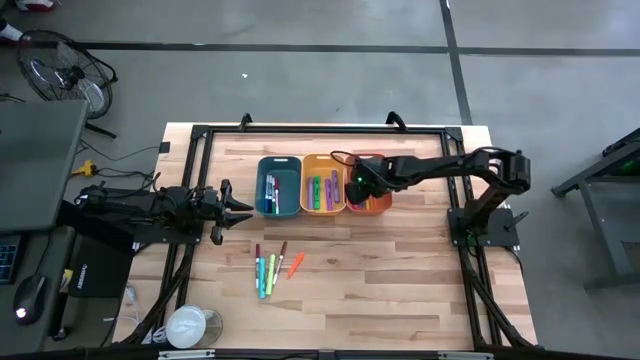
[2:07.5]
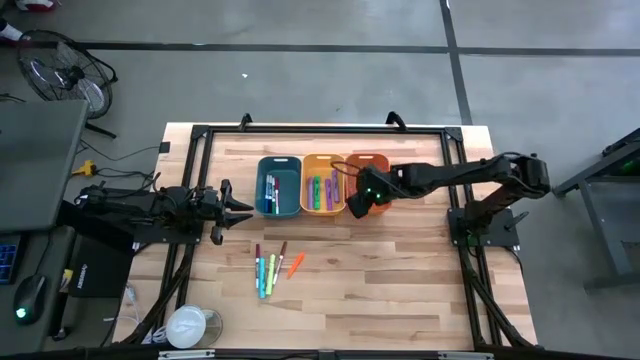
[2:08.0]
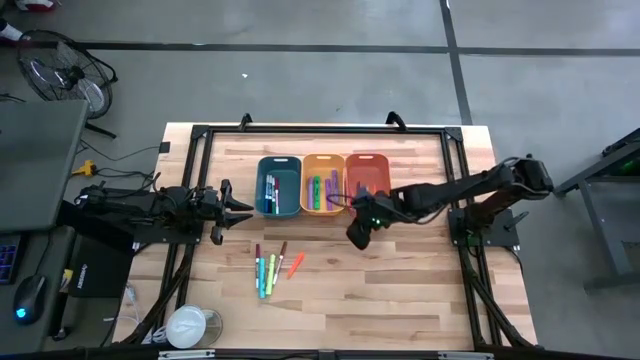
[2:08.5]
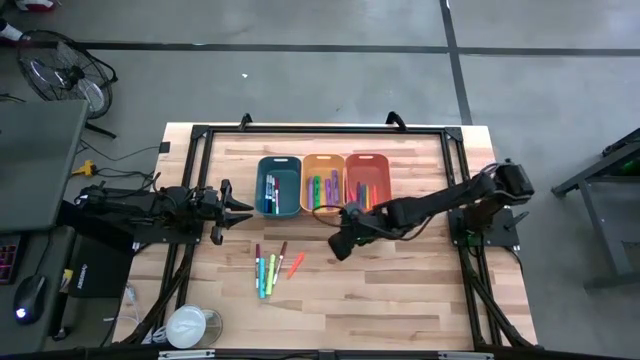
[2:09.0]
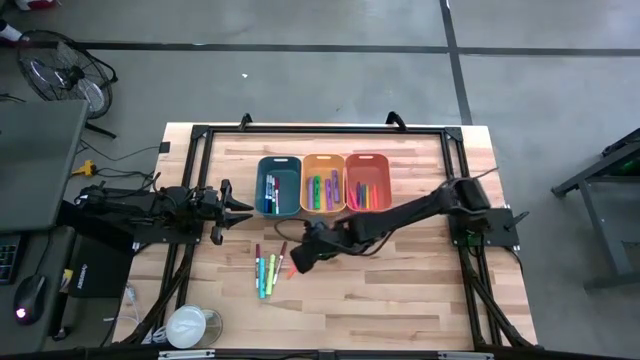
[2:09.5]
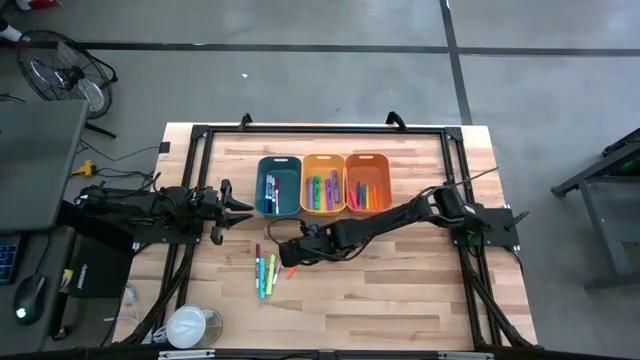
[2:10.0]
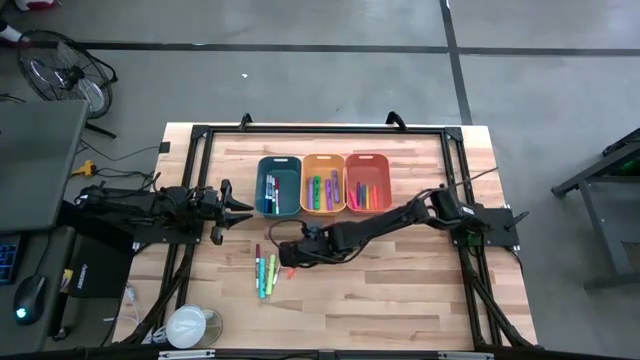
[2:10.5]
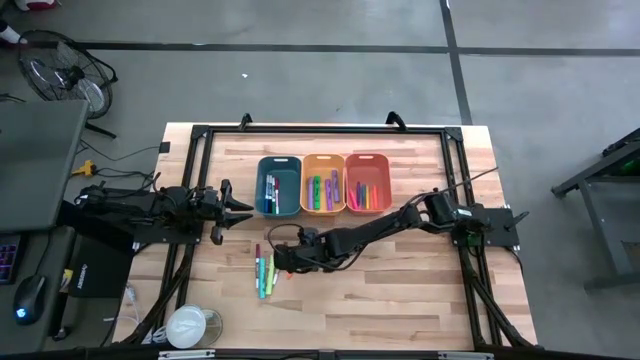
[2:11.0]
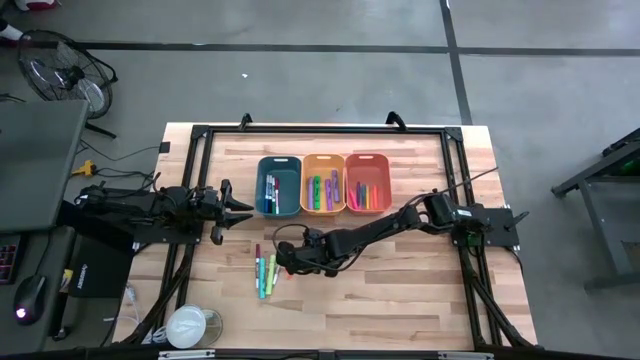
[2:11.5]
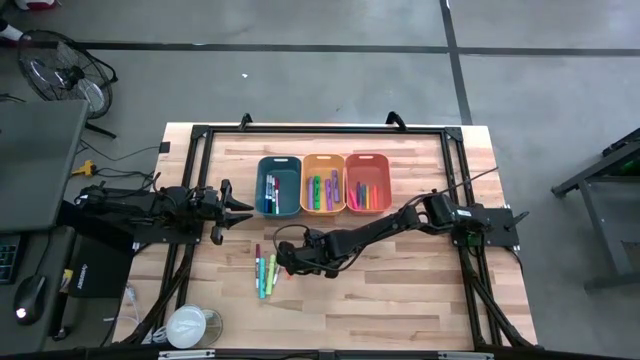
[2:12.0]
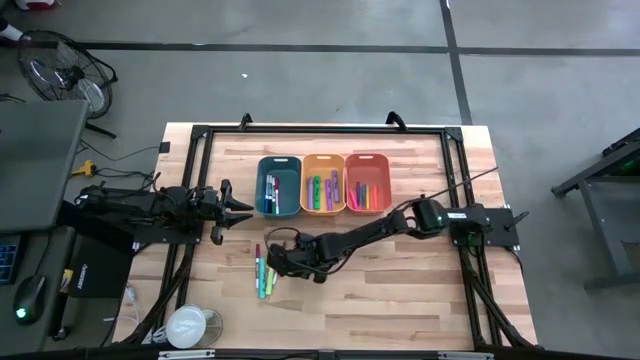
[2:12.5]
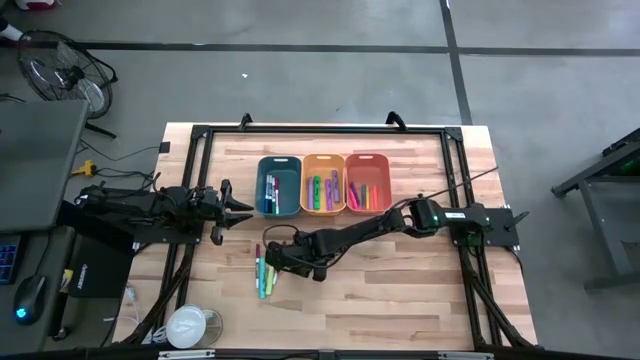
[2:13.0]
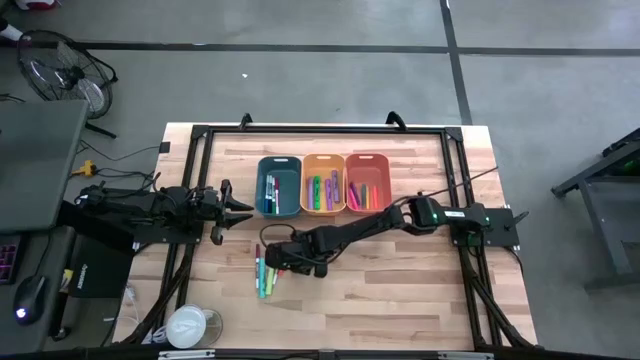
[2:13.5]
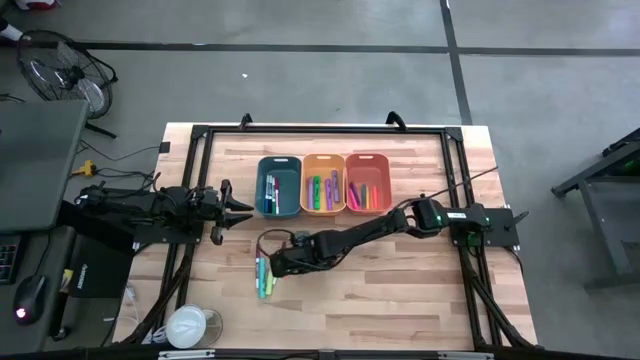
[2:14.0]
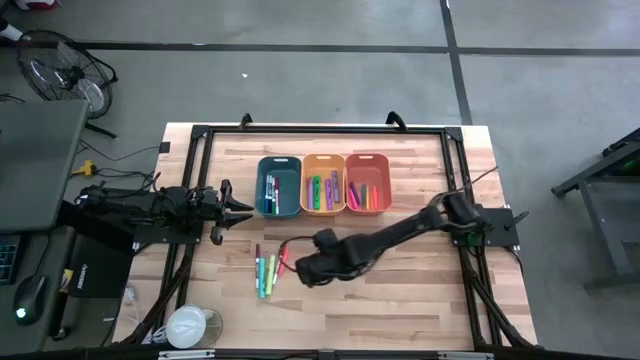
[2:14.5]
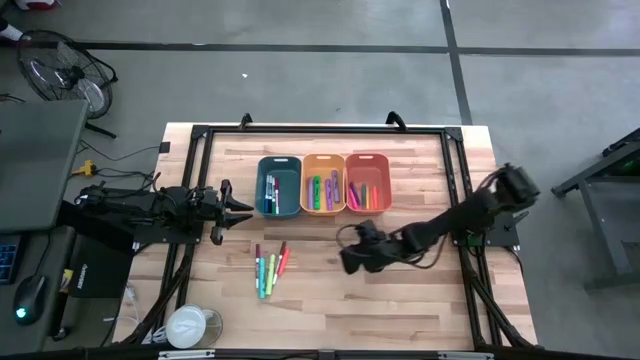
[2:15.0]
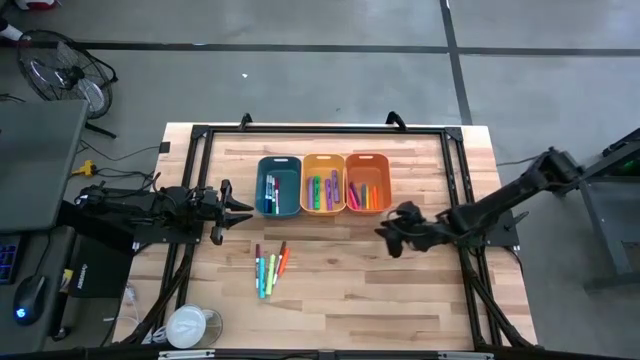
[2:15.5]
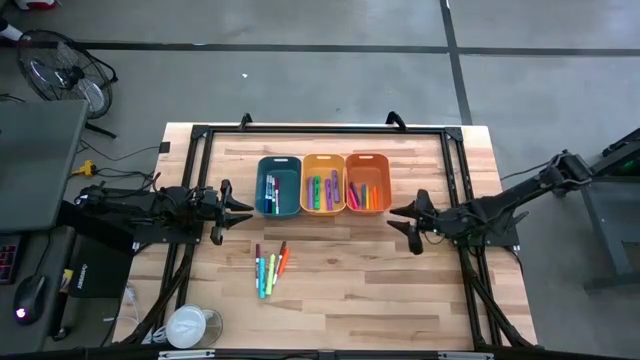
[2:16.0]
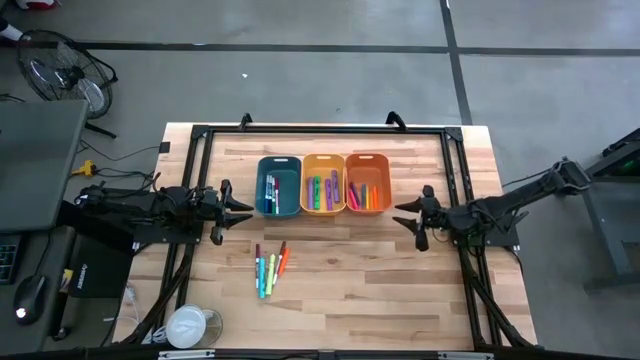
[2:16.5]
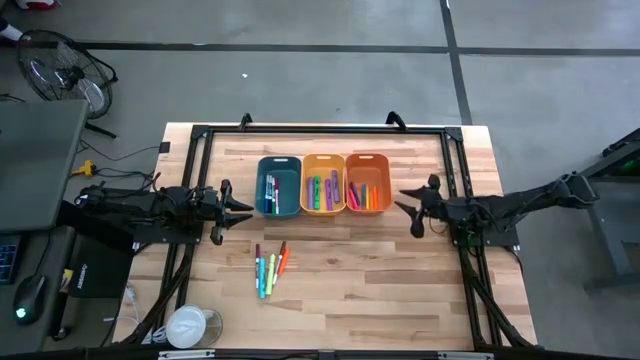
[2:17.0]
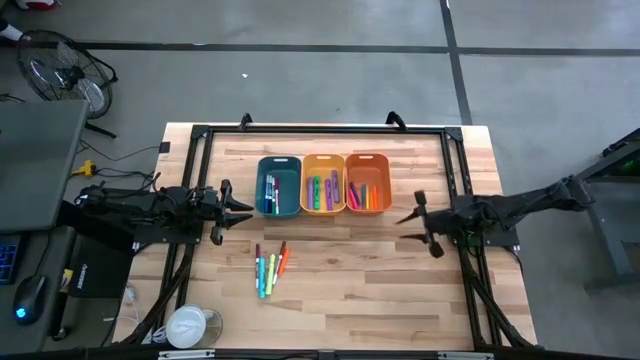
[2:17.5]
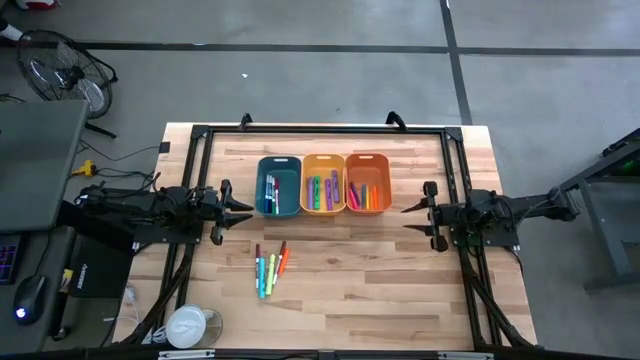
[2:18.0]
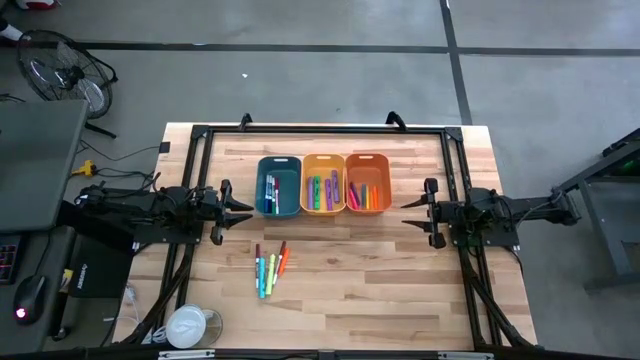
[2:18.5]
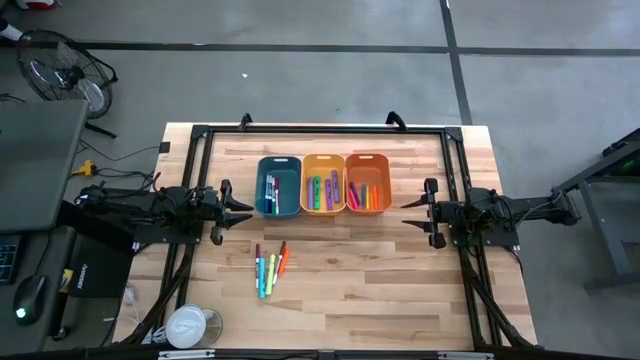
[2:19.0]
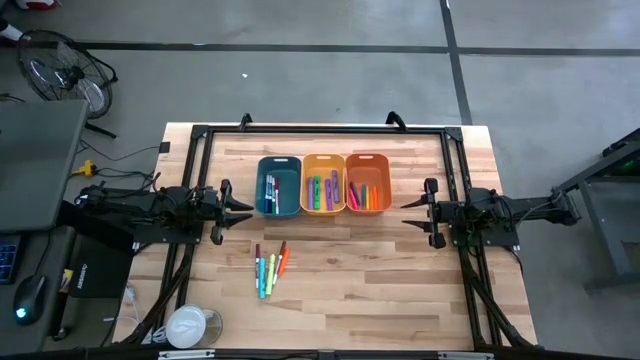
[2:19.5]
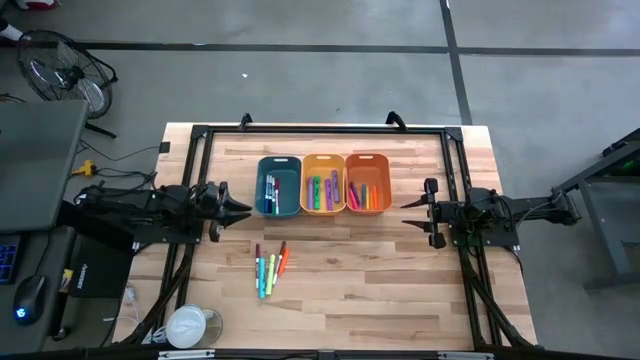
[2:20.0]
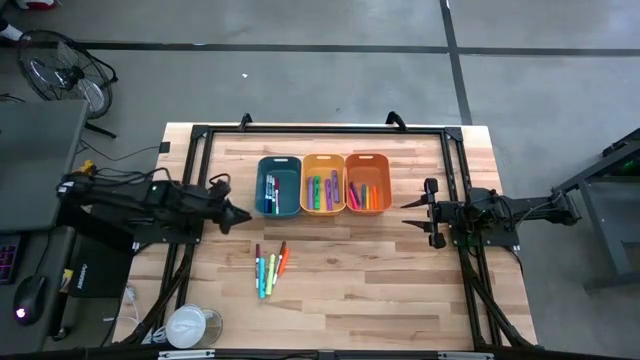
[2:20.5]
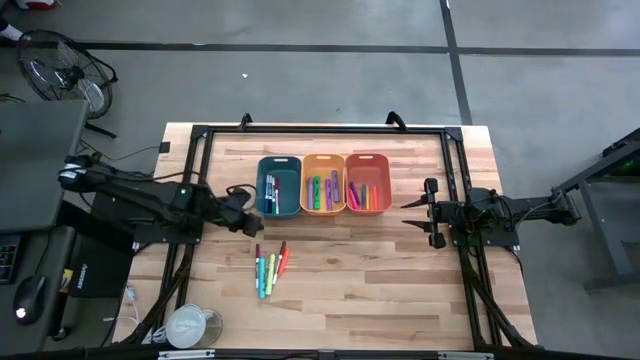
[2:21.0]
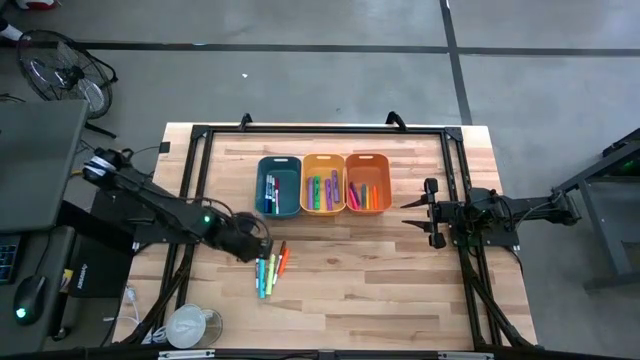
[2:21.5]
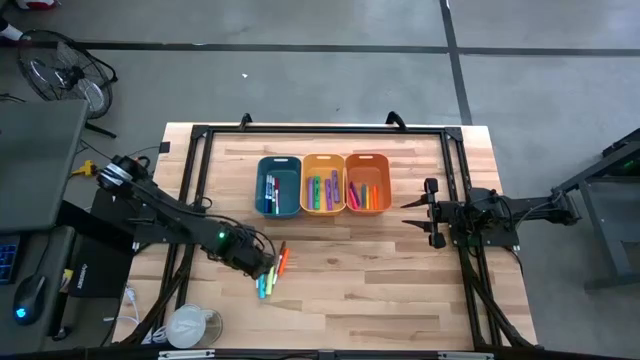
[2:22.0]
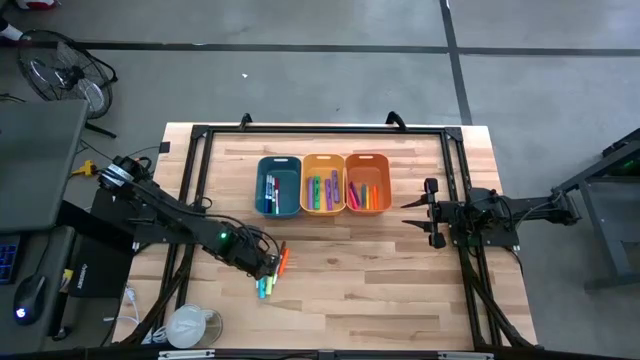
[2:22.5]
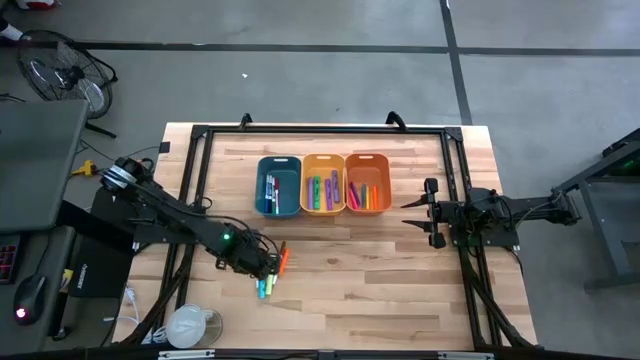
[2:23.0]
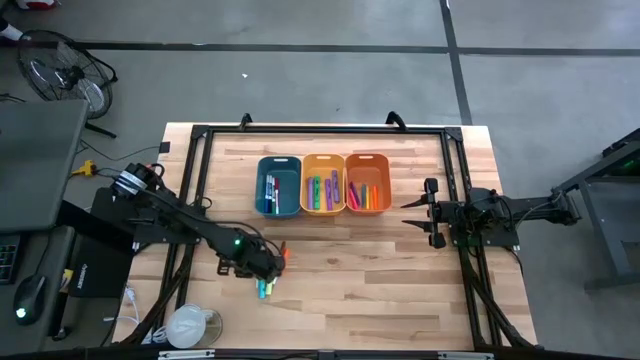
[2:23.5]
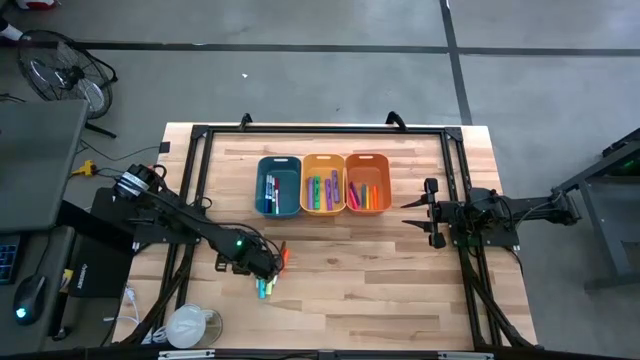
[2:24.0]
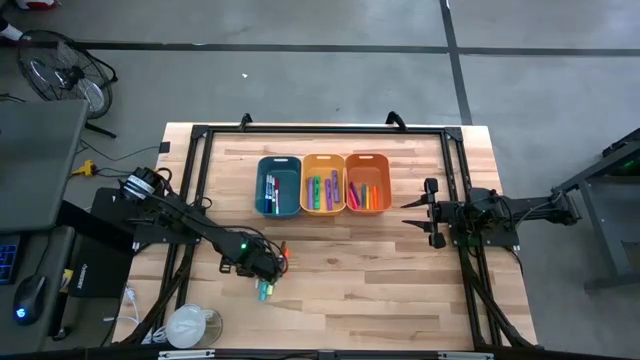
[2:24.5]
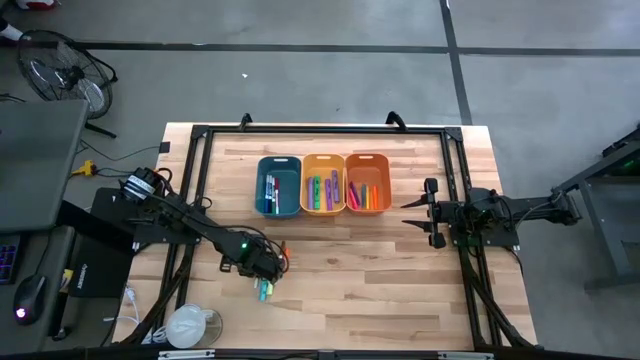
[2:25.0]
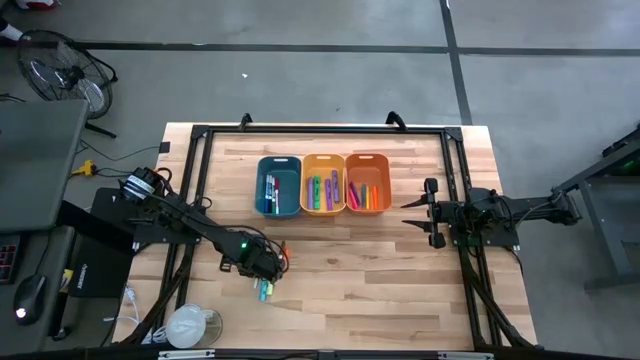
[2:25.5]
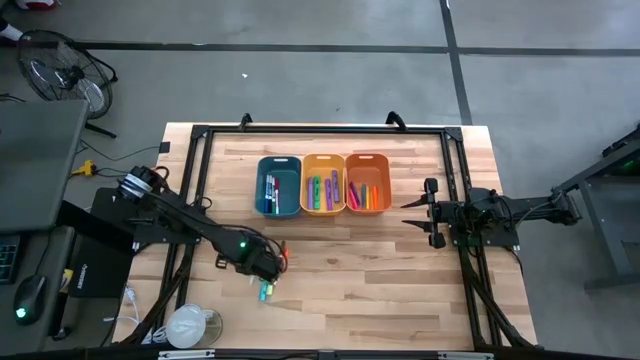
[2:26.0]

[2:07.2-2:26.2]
Task: Pick & Place Markers
Put the dark red marker pen into the blue bin
